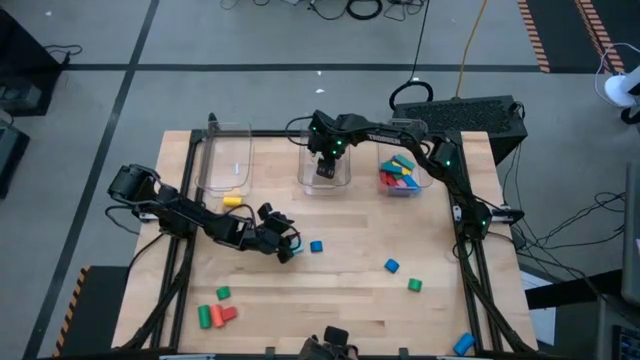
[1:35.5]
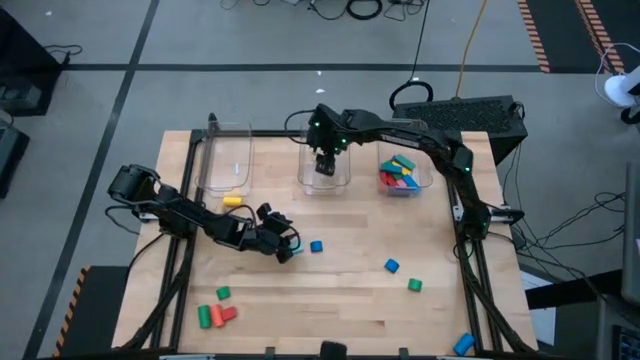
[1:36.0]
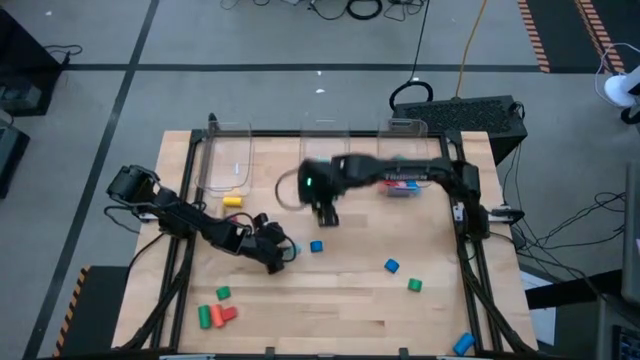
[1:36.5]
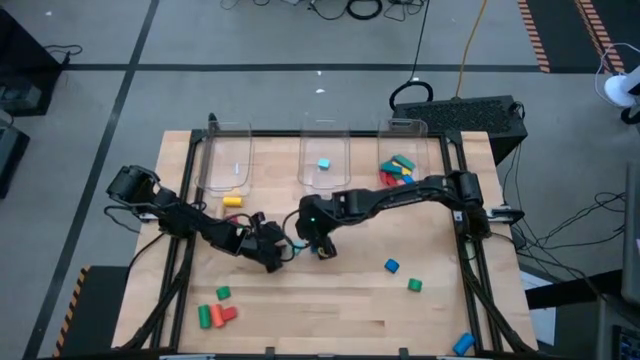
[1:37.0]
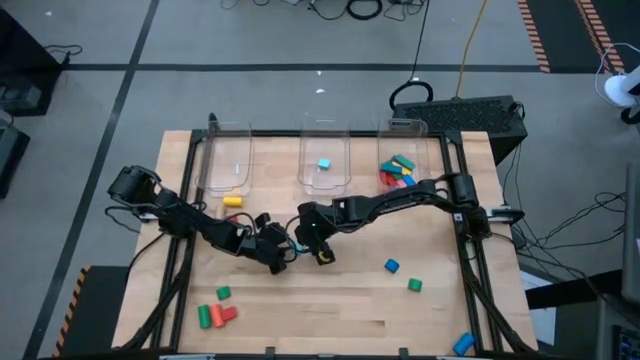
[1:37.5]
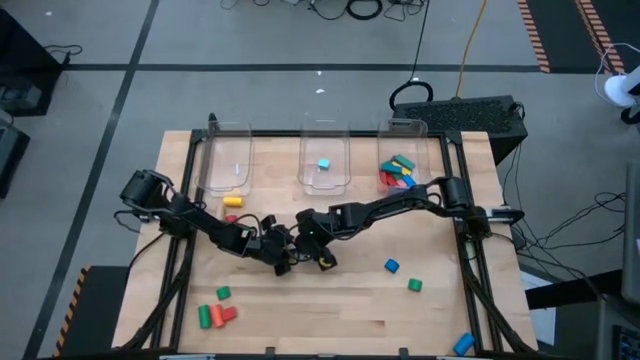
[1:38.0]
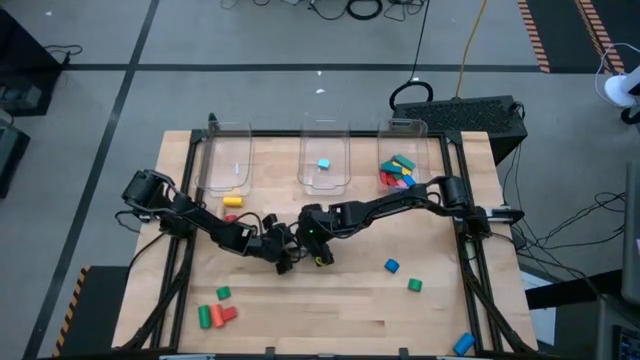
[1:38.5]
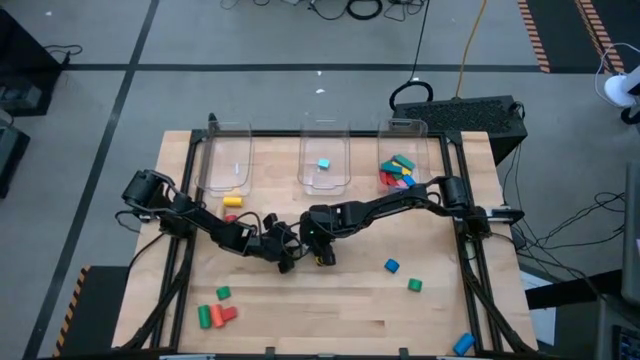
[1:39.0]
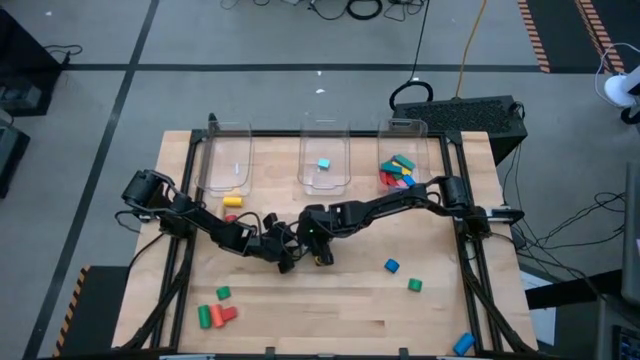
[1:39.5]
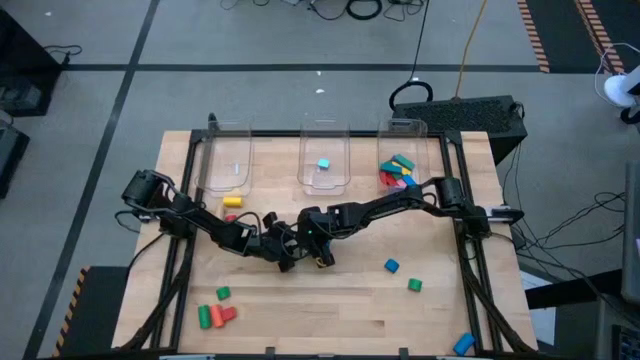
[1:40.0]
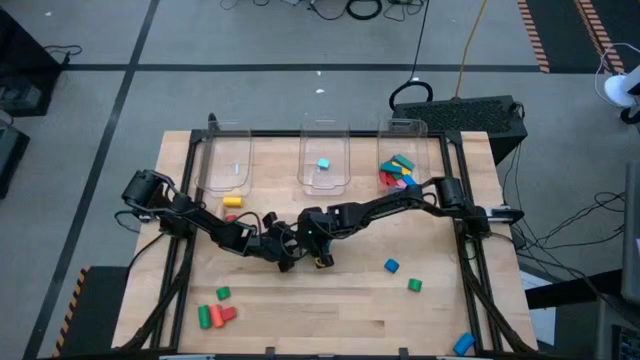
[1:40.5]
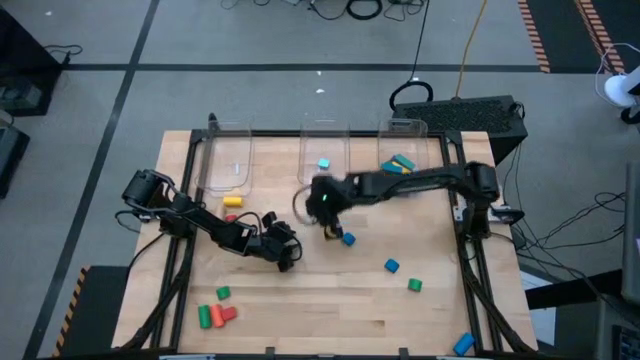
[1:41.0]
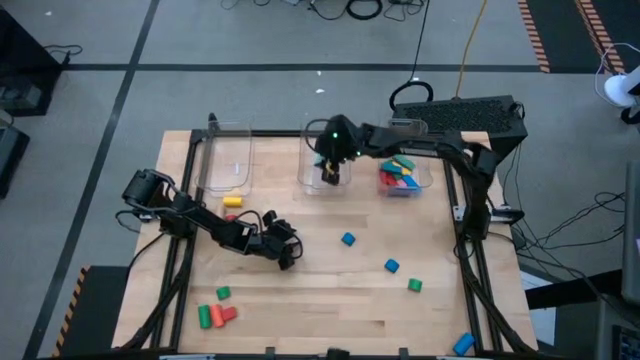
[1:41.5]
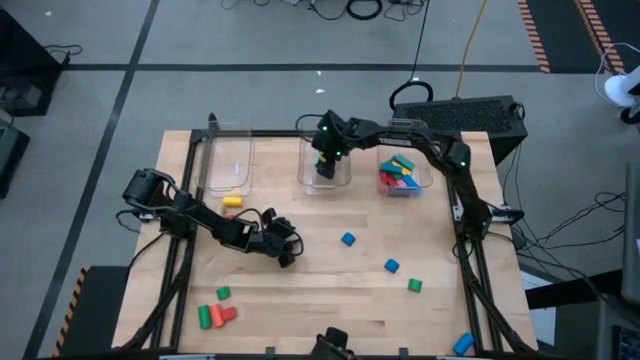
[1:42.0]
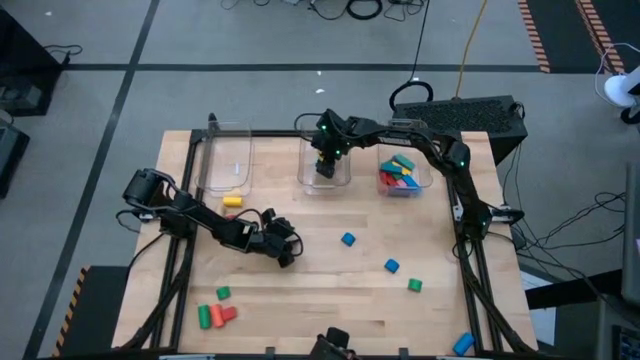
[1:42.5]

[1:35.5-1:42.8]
Task: Sort blocks by size
Put the light blue half circle block into the center transparent bin

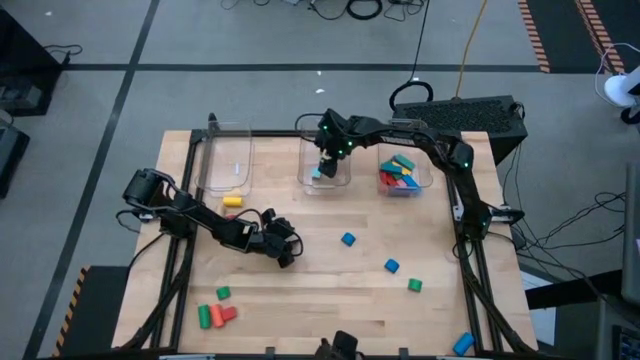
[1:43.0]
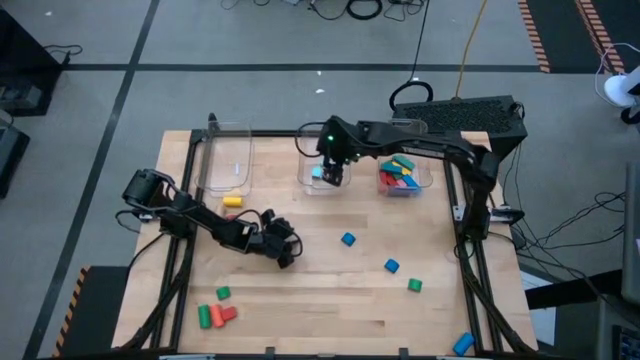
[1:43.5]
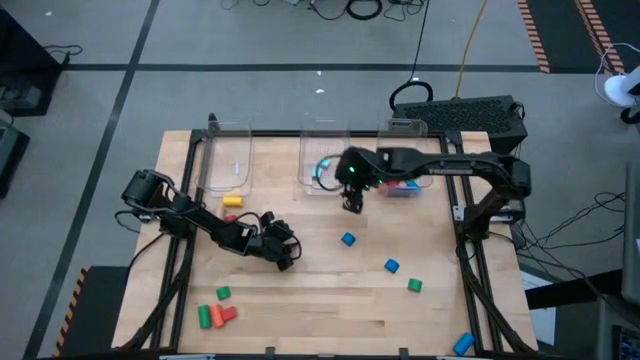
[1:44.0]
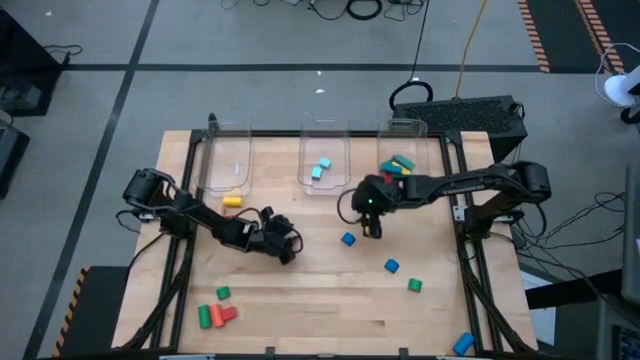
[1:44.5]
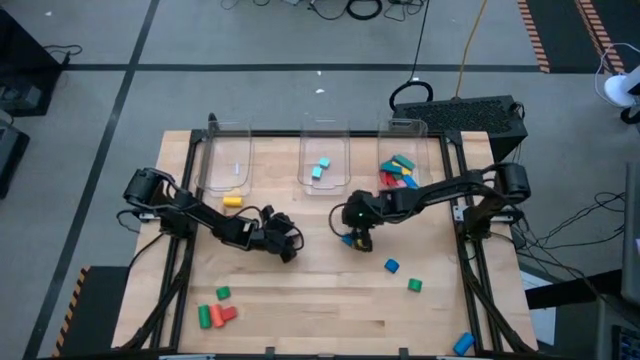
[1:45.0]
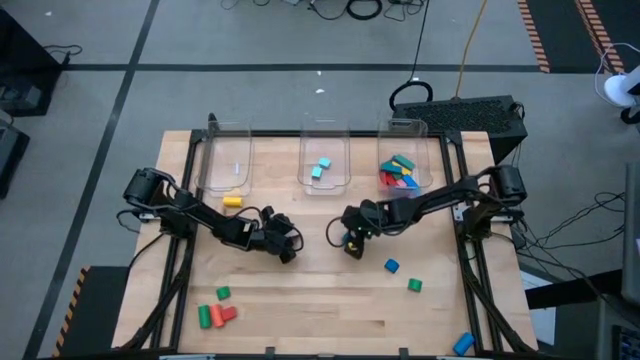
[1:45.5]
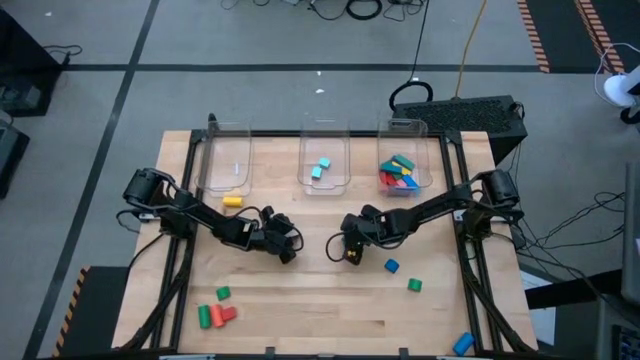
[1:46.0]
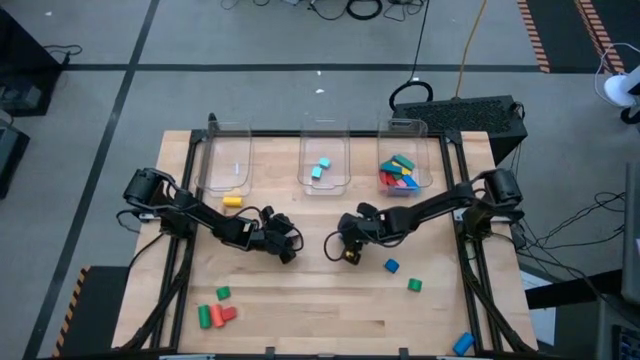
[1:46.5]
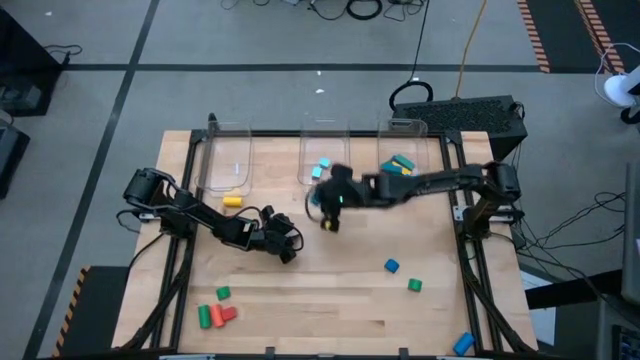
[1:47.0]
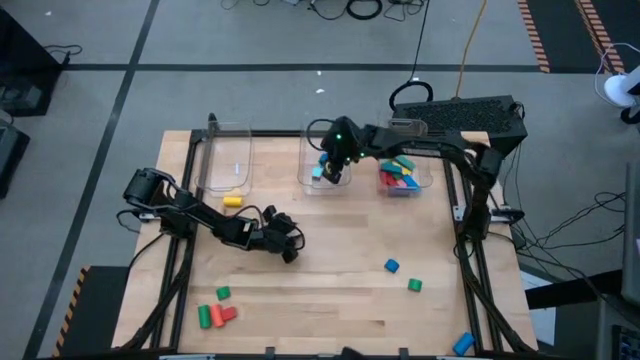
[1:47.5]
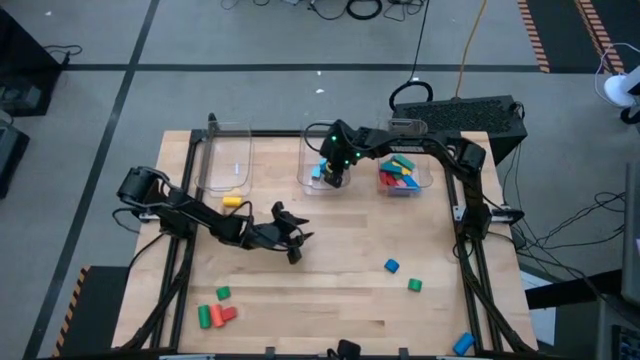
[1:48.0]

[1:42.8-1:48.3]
Put the blue half circle block into the center transparent bin

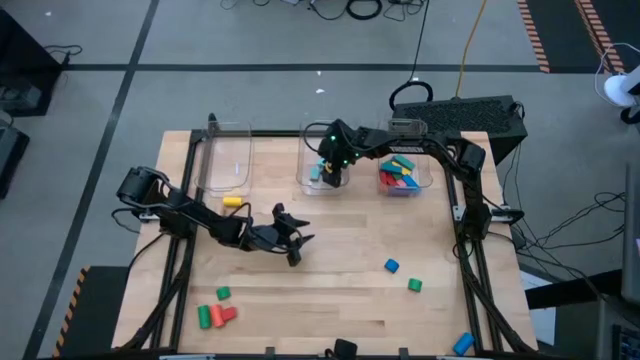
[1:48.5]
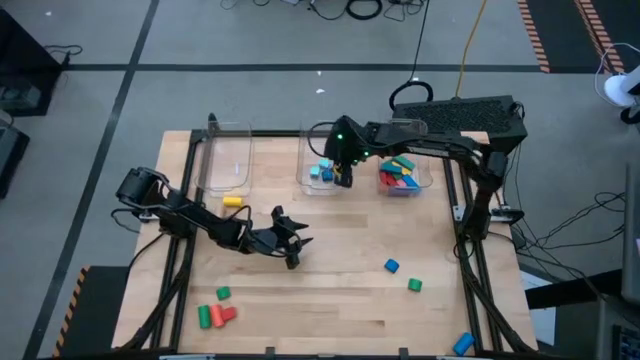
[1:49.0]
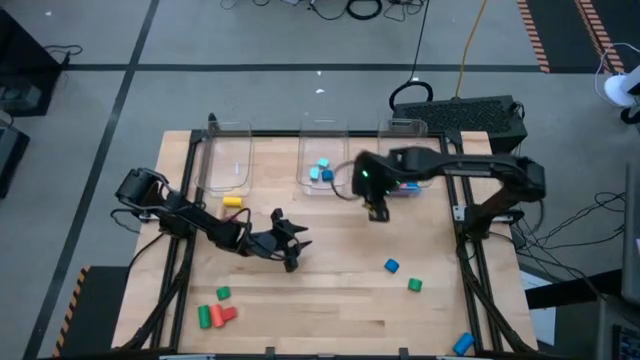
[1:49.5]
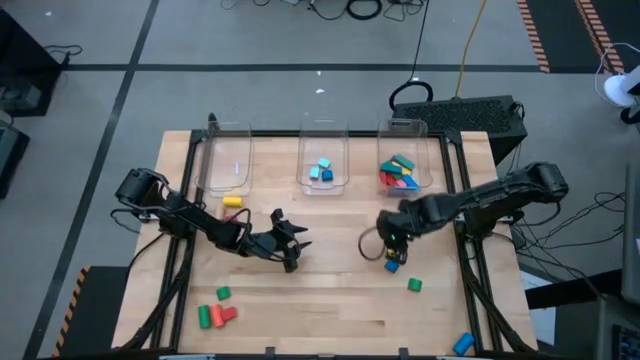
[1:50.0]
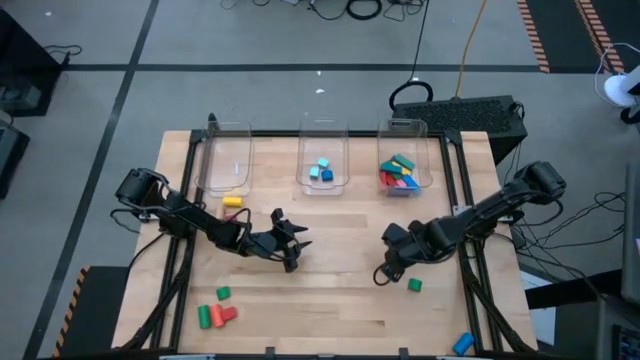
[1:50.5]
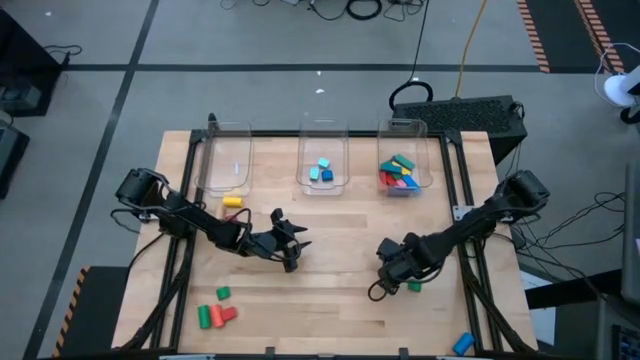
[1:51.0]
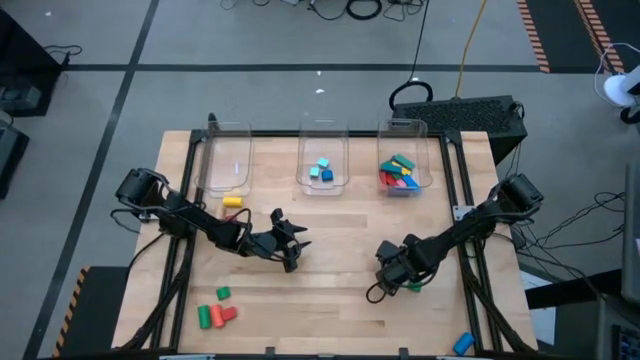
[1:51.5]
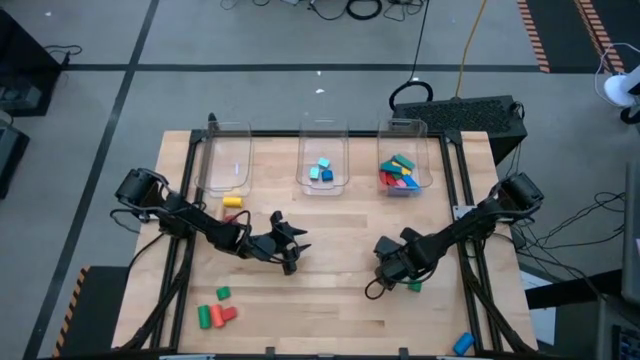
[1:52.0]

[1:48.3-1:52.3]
Put the blue half circle block into the center transparent bin

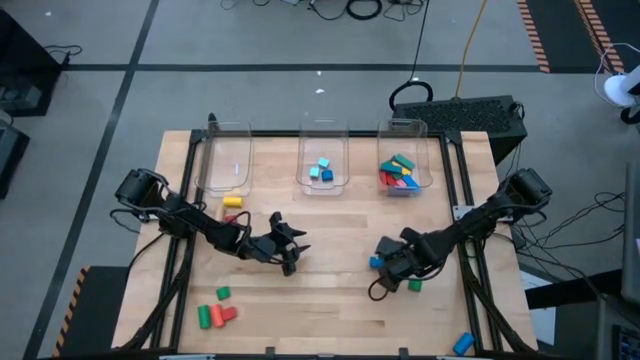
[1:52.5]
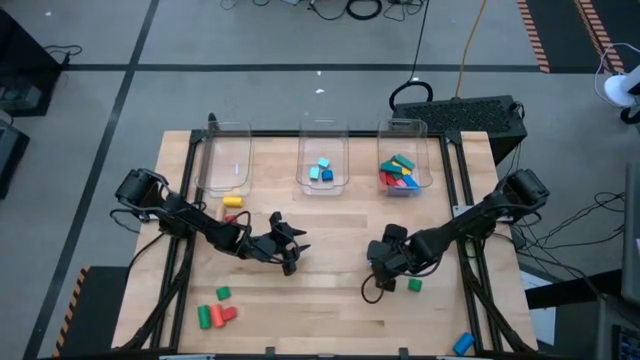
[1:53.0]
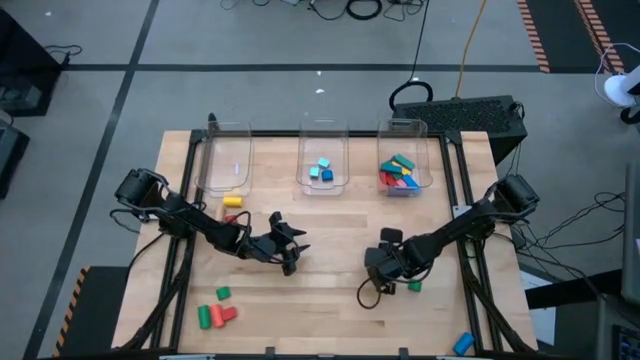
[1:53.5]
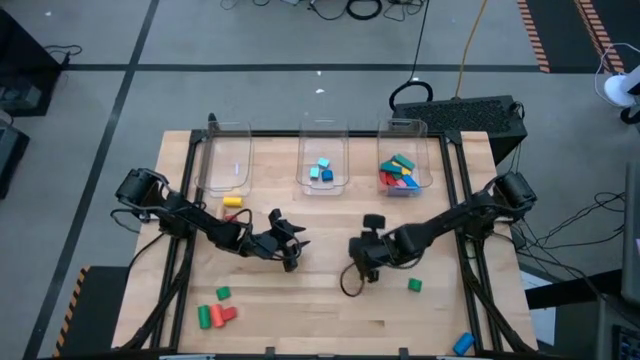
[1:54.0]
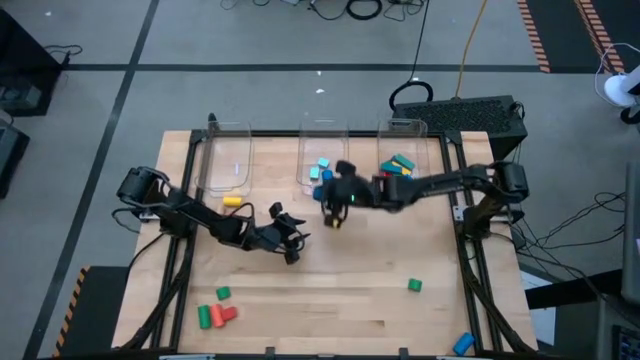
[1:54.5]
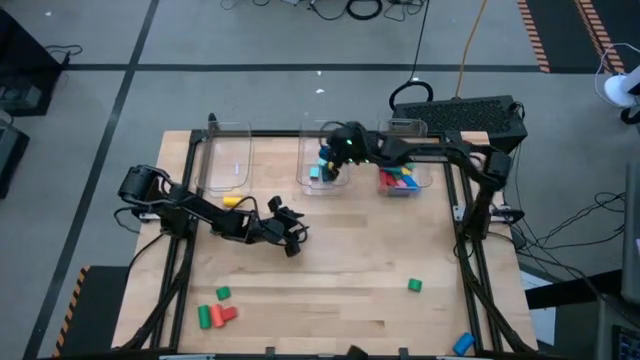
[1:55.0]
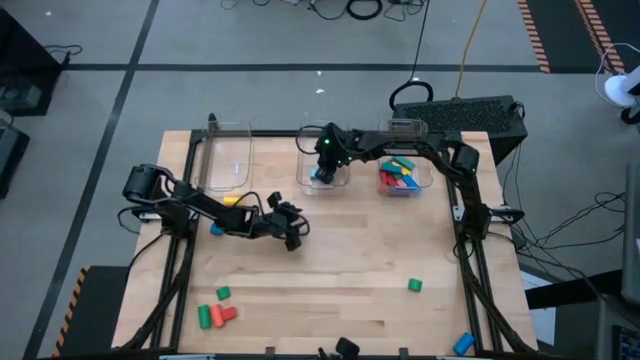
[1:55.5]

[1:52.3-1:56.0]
Put the blue half circle block into the center transparent bin
